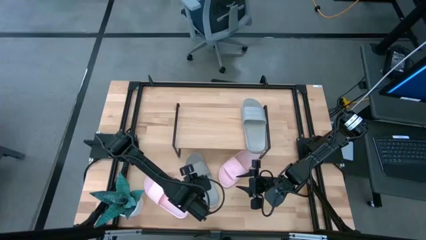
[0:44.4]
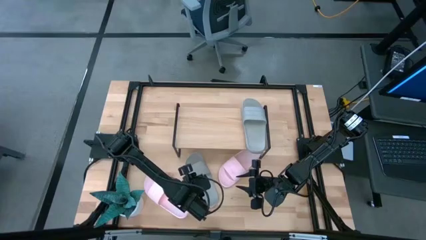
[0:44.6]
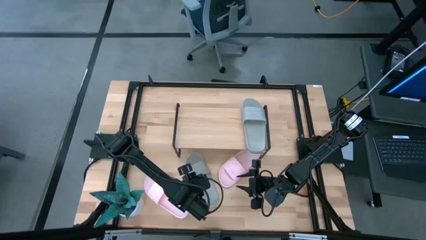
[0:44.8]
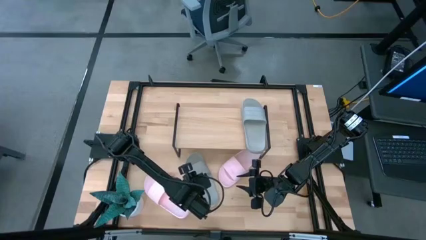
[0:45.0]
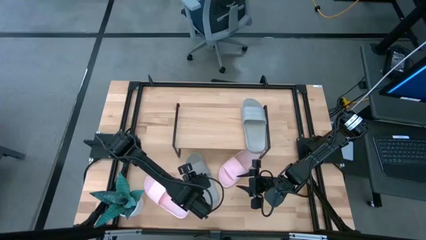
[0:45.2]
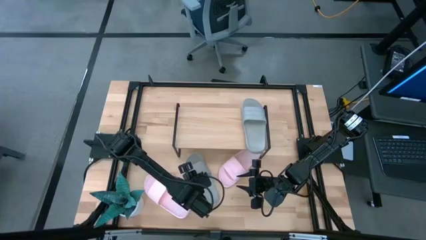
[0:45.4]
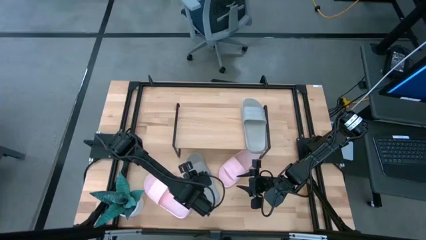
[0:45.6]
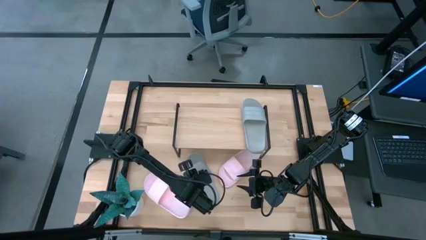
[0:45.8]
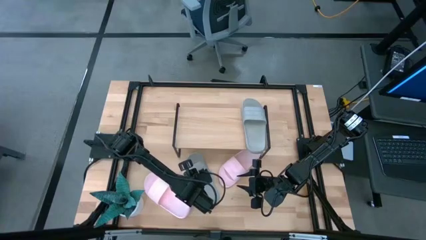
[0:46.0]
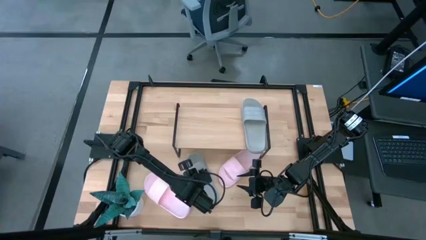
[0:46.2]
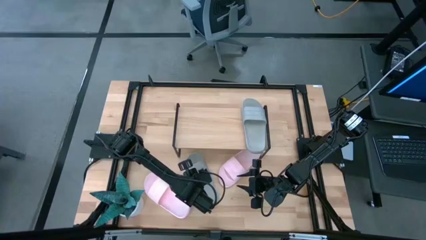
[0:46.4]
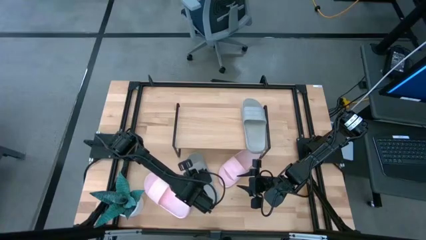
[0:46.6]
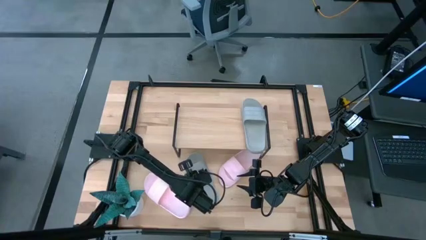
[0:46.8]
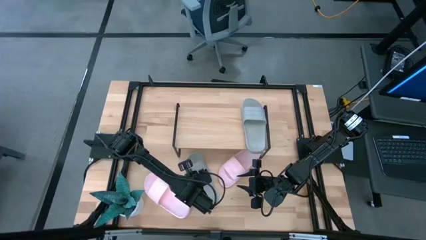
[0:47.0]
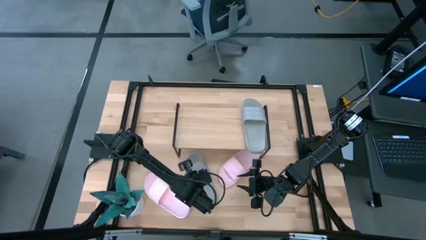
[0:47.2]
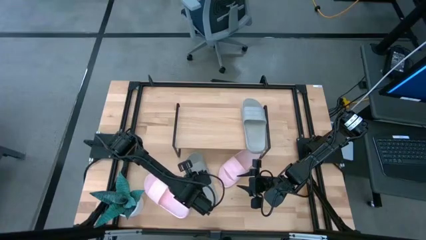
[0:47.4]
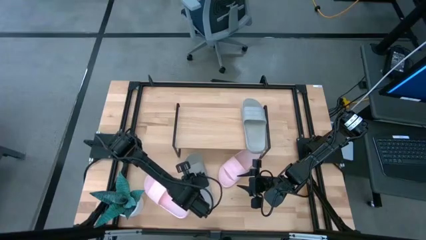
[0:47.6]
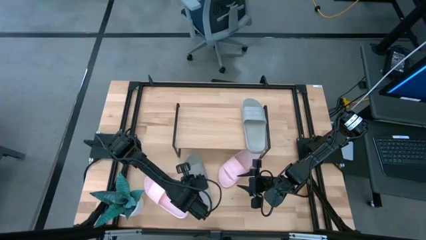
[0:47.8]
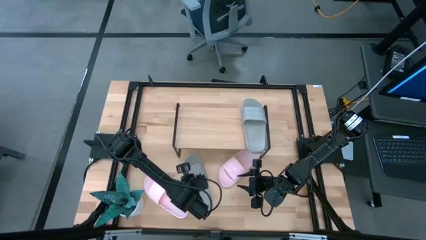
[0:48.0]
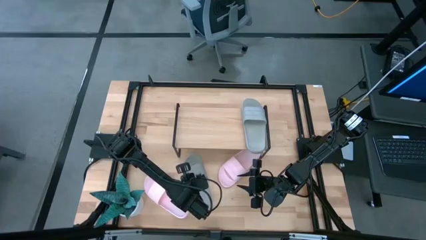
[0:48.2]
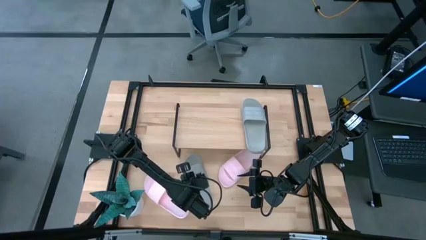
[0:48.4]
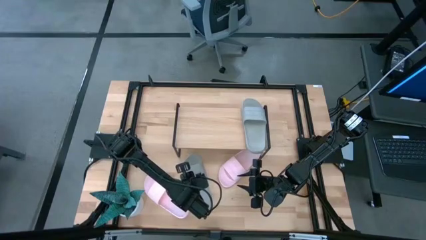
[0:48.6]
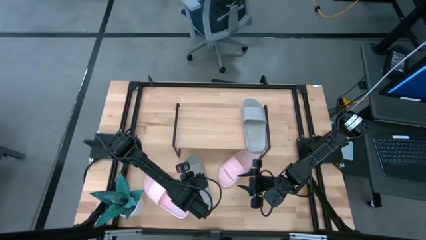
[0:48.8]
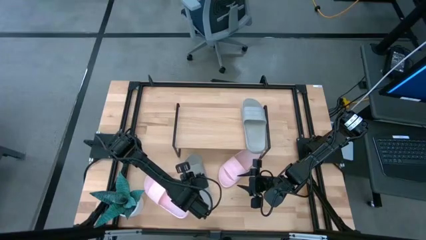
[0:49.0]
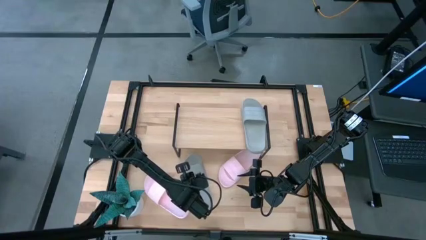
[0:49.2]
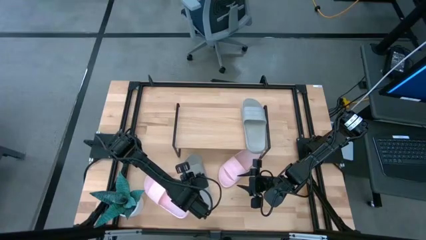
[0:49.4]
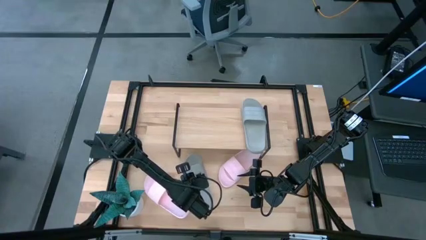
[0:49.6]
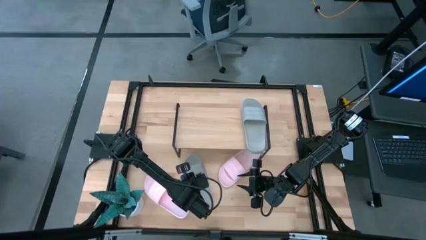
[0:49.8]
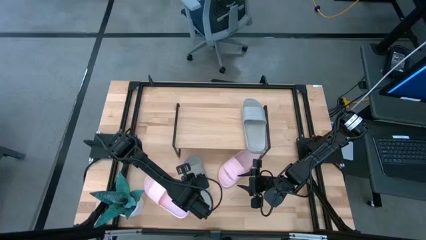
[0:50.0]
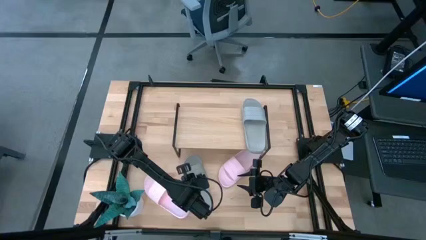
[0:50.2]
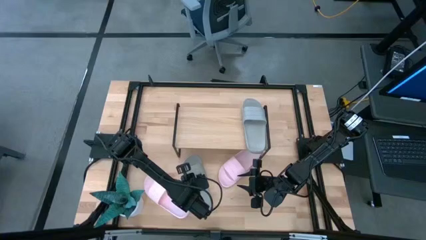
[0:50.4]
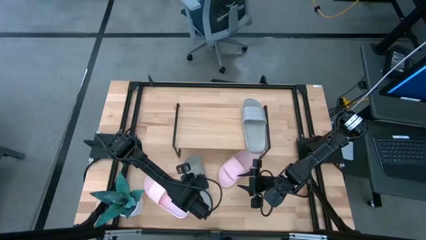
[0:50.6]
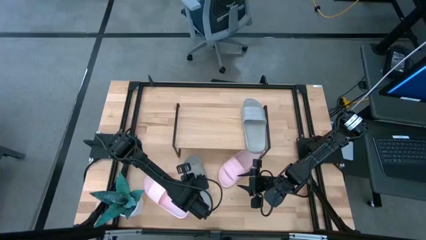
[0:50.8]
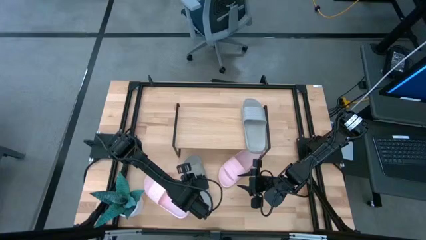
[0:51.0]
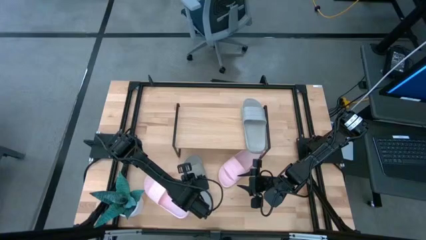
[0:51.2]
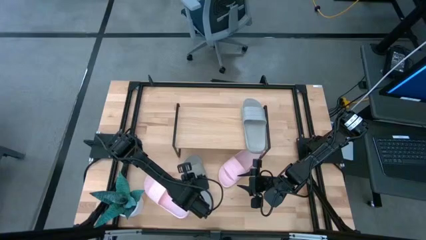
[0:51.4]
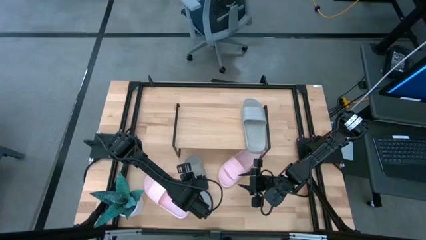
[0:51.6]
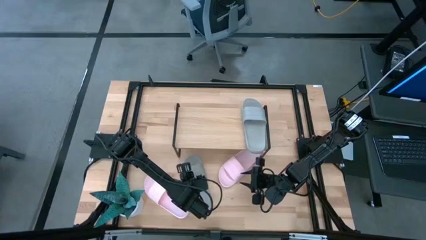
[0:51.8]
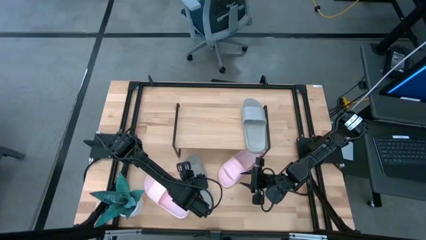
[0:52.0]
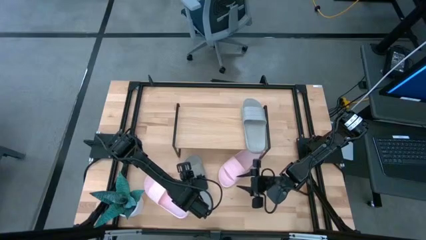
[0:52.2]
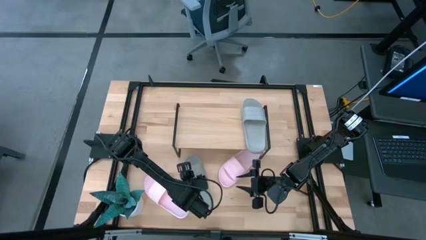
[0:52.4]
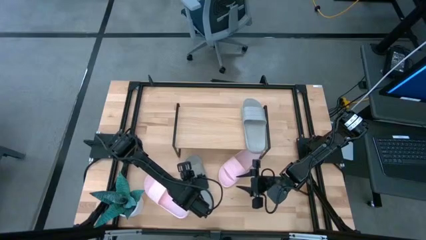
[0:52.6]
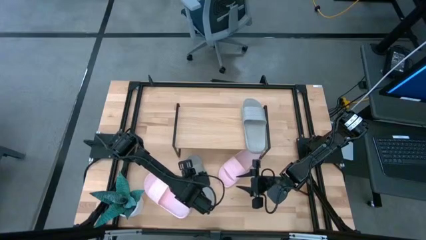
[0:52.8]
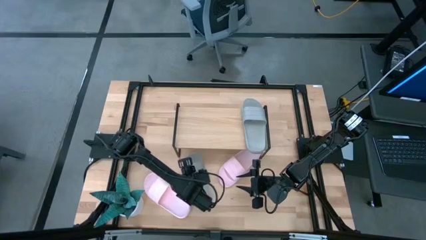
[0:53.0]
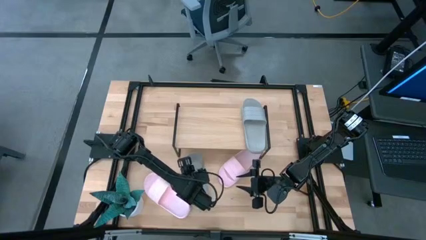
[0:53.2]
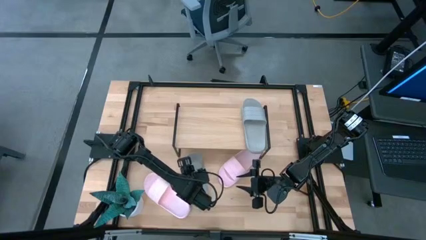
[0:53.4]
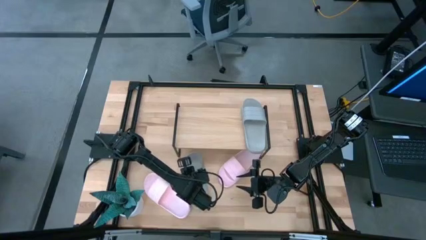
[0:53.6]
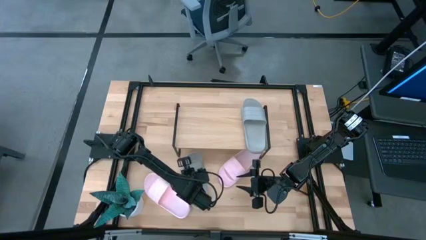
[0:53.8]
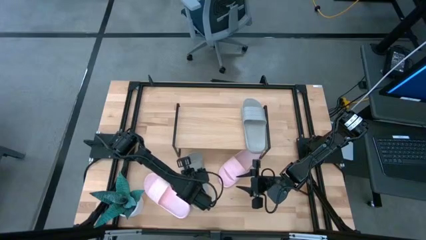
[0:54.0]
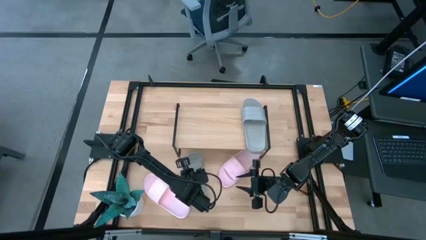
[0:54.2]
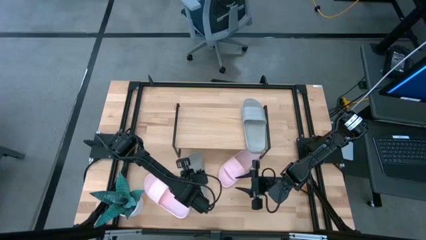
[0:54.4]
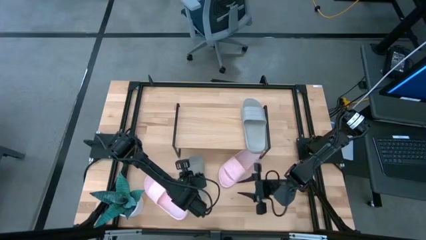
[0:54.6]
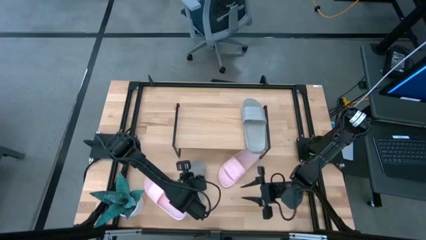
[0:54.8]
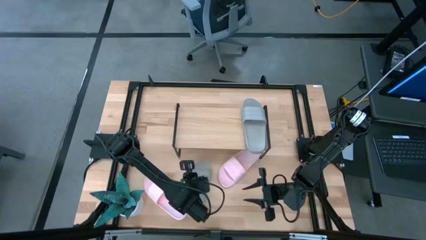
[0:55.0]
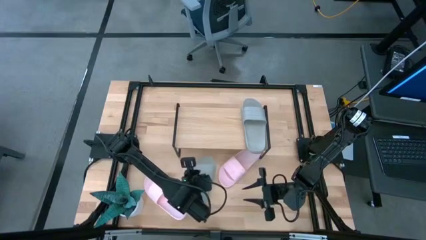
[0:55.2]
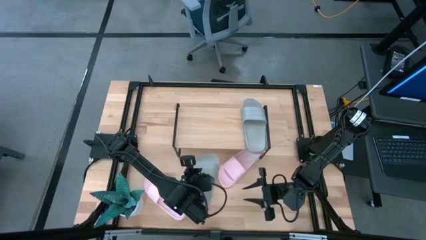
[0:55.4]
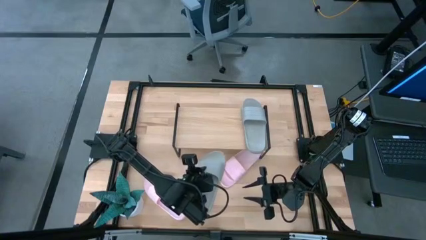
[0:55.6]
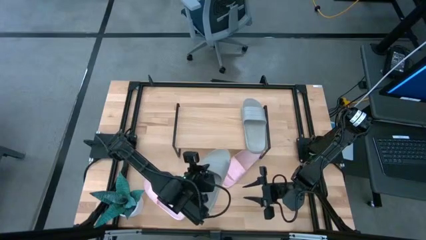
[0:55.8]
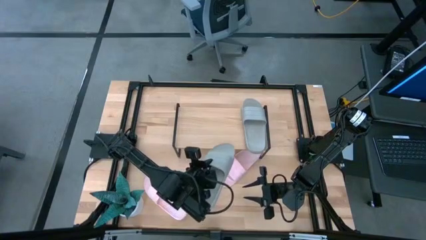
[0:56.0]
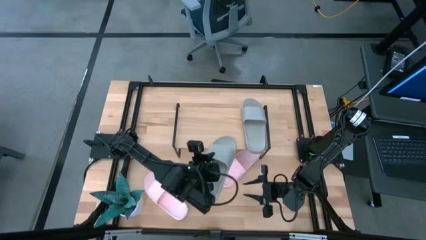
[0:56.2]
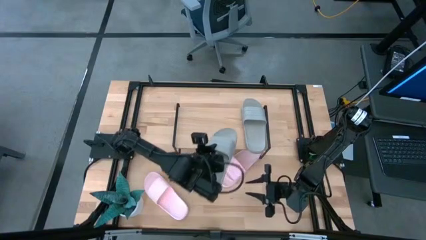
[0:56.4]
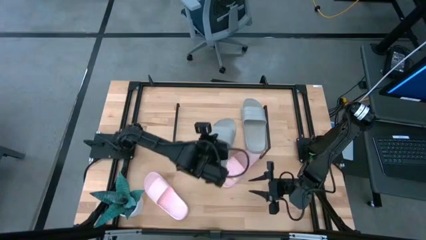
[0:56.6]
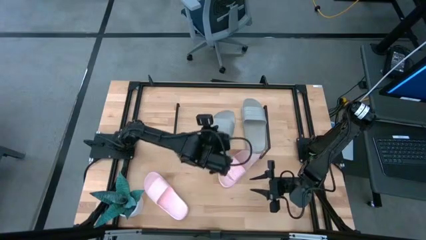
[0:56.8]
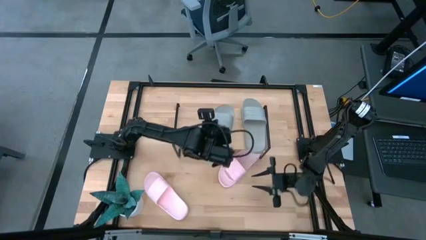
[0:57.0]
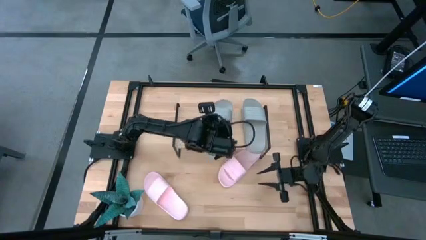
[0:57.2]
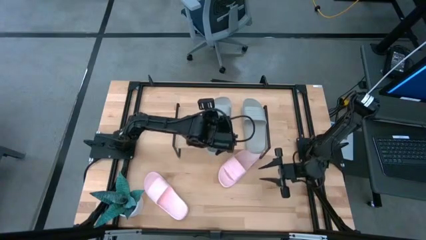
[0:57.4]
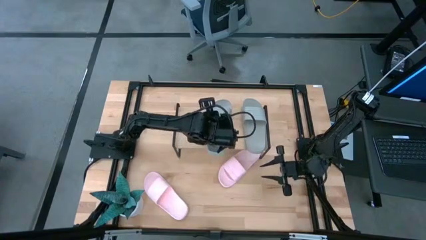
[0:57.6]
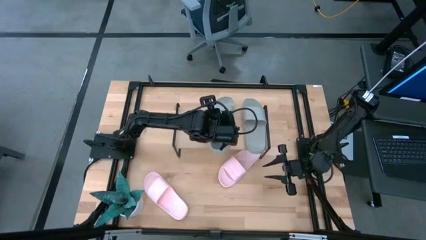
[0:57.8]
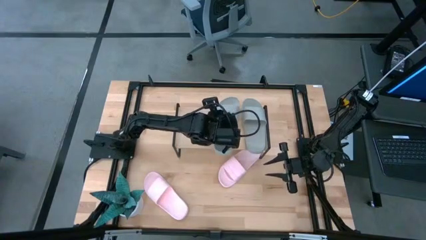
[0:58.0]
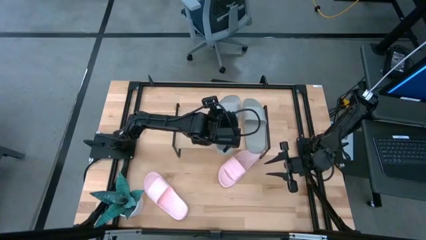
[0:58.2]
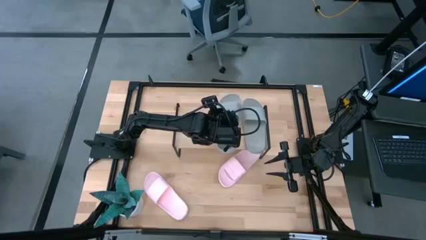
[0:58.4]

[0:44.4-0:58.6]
Task: Pick and place slides into the shelf
Put the gray slide on the shelf

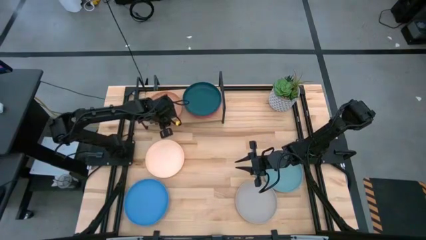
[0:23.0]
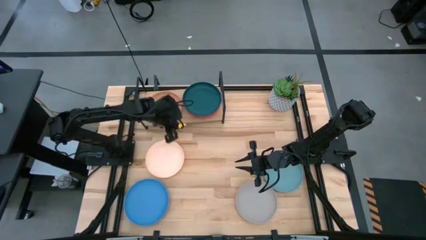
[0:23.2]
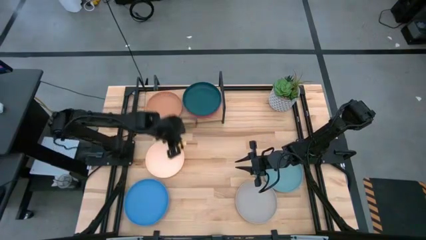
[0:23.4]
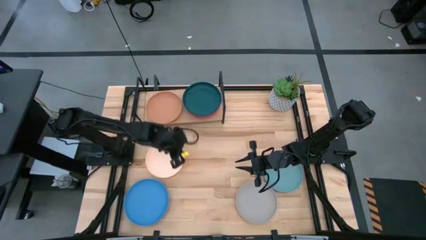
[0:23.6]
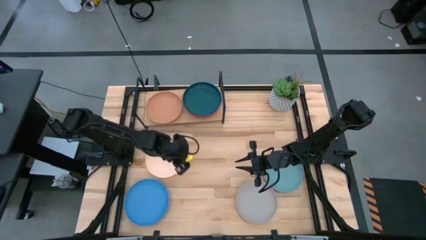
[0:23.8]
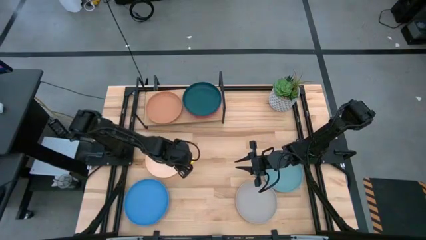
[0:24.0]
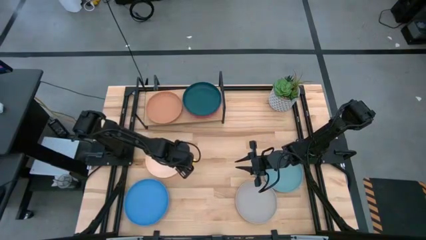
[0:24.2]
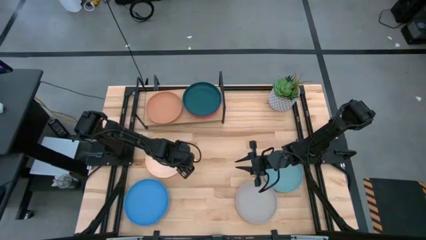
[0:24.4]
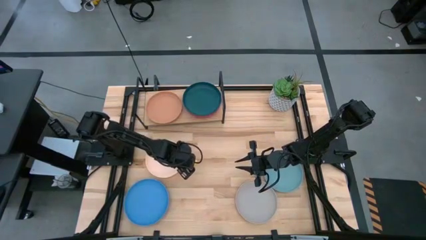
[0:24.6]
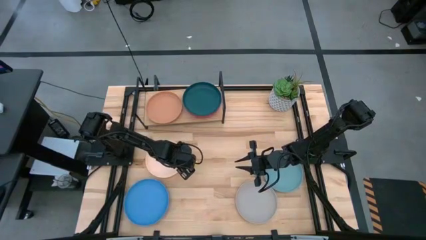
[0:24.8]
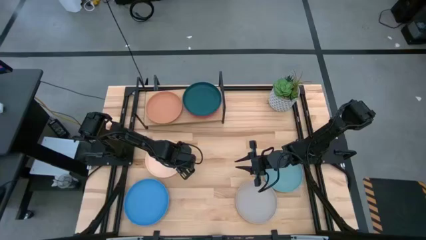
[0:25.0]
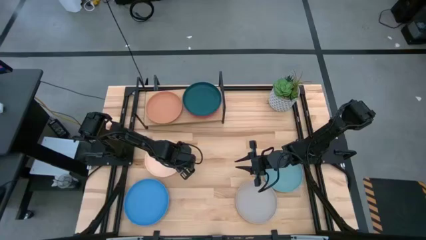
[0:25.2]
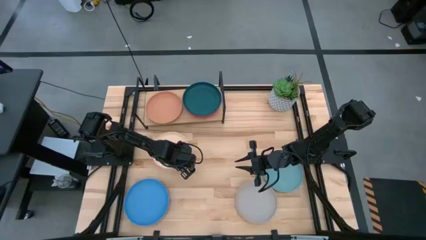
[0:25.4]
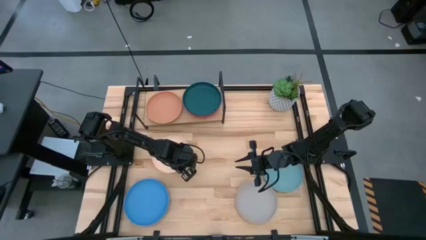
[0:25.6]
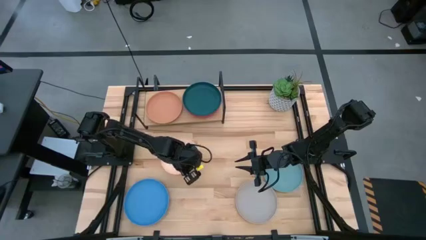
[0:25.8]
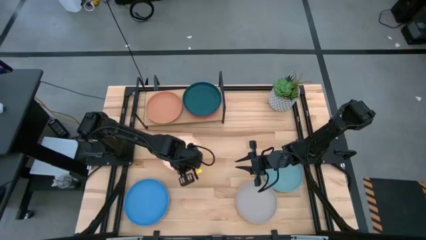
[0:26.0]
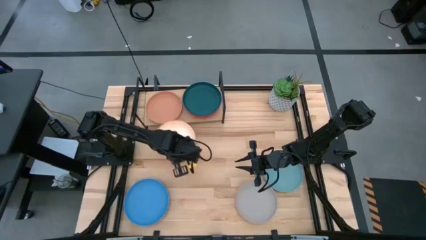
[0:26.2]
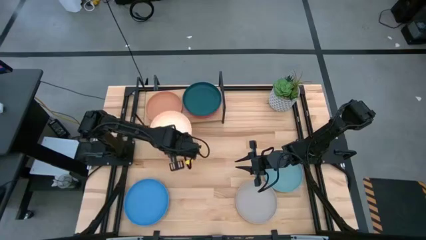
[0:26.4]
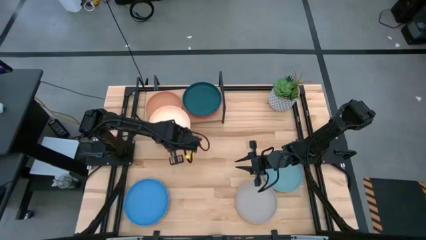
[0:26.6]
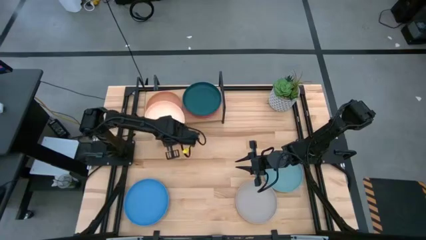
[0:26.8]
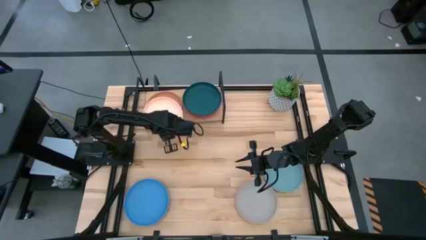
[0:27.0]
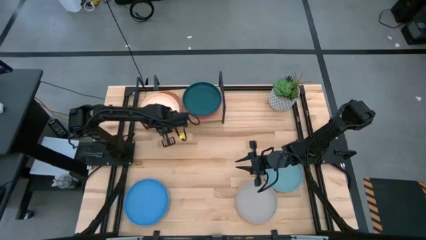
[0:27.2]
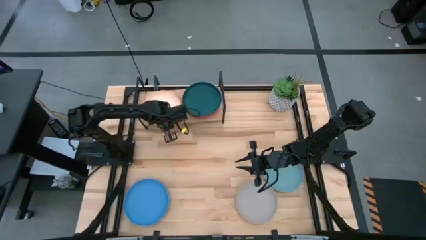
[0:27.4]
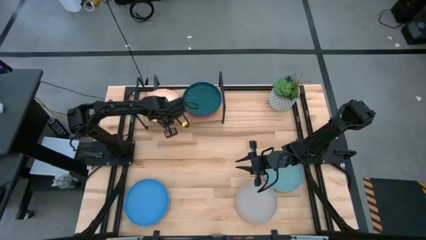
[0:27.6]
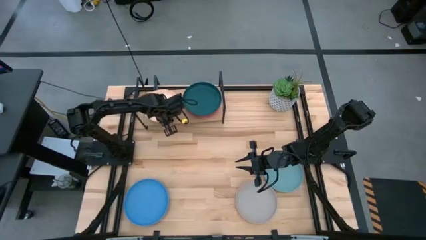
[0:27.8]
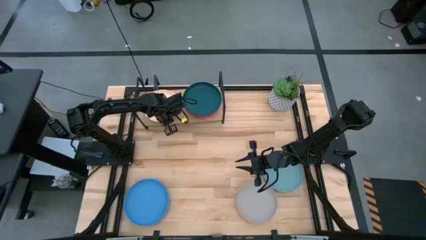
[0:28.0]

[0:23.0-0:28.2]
Task: Place and stack plates onto a shelf
Stack the light orange plate on top of the brown plate on the shelf
